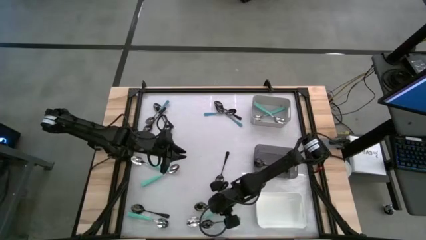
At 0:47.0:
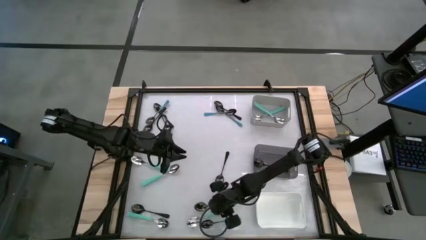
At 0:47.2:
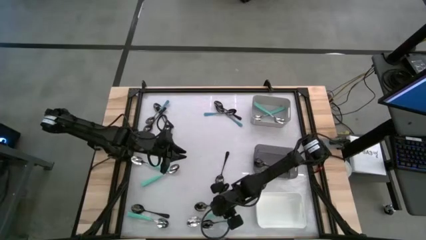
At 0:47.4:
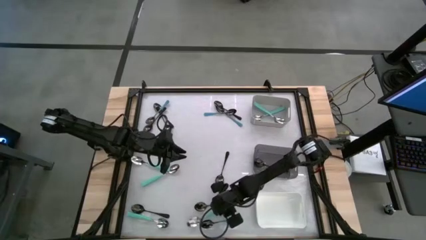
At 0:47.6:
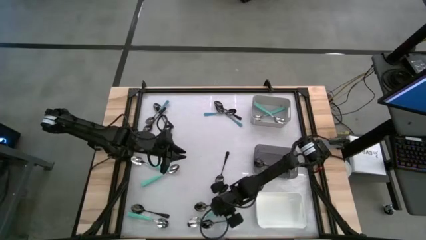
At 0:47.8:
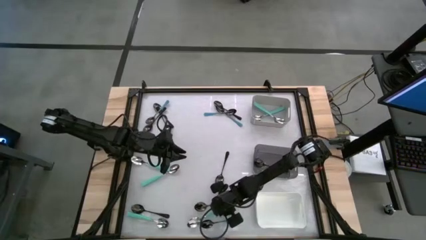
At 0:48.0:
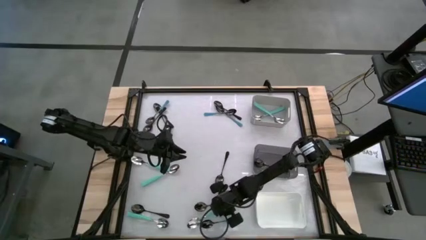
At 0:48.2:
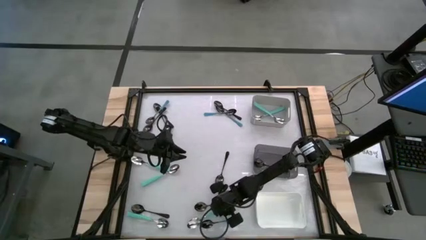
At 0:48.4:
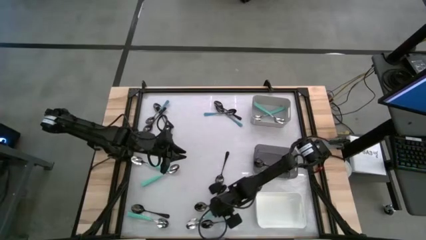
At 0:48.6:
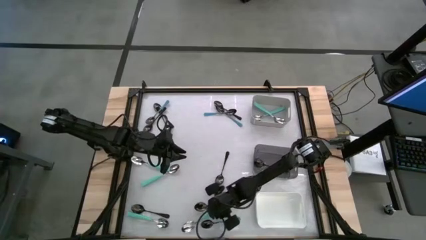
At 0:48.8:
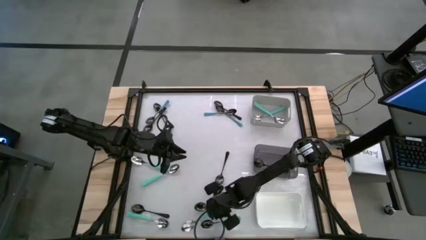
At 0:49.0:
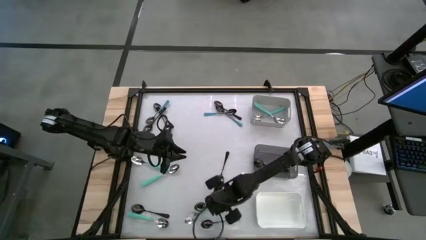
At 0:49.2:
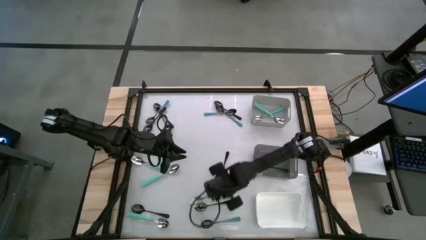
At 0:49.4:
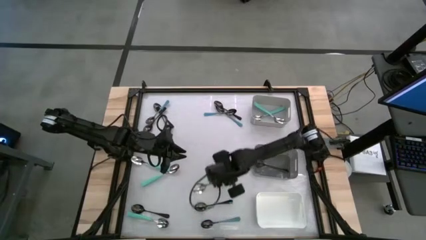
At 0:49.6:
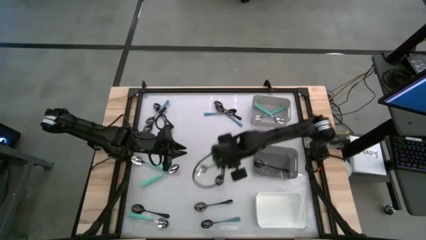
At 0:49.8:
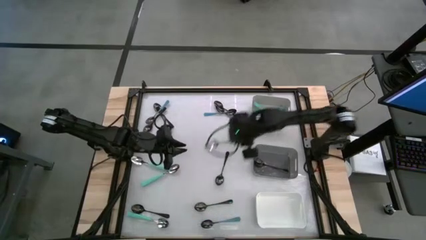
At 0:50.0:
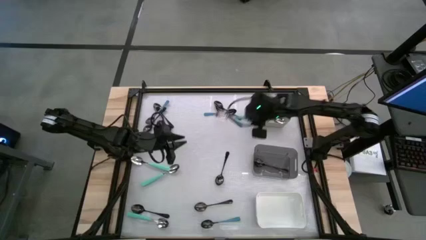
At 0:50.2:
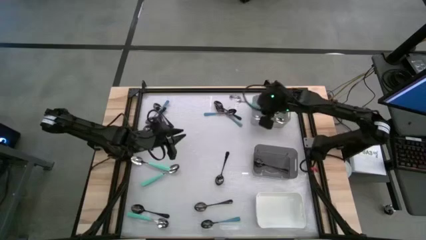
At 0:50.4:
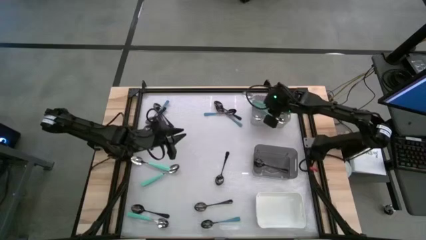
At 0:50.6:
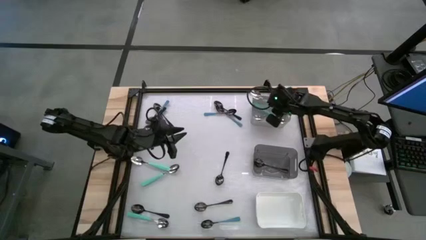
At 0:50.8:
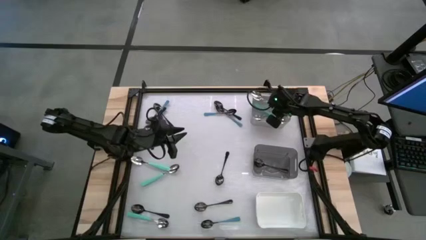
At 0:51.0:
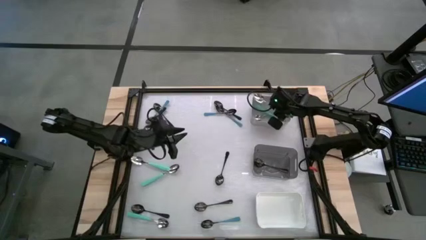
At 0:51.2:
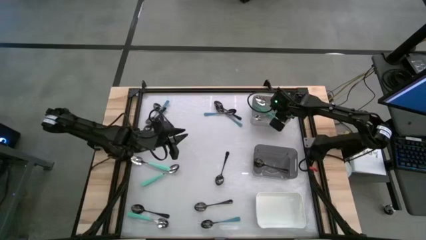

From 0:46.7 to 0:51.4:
Task: Sort silverware by color (type)
Put the light blue spoon into the gray bin

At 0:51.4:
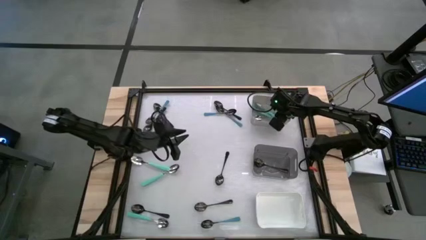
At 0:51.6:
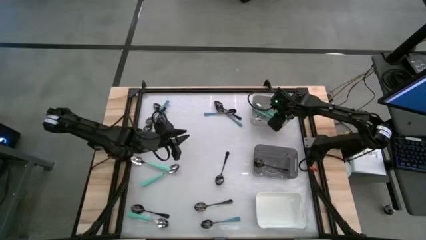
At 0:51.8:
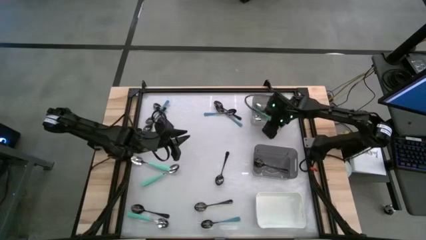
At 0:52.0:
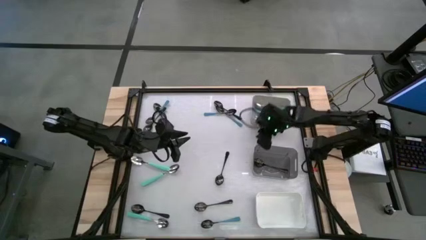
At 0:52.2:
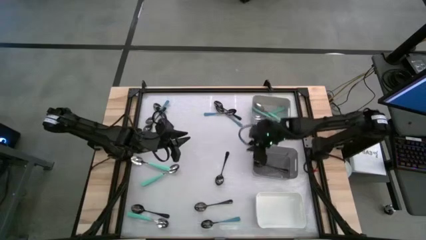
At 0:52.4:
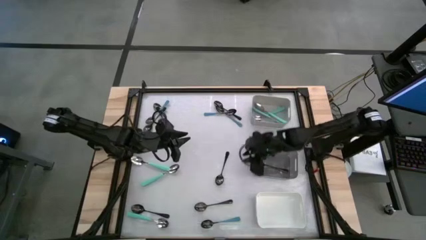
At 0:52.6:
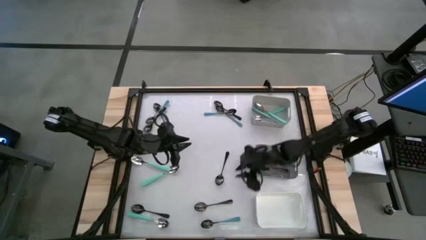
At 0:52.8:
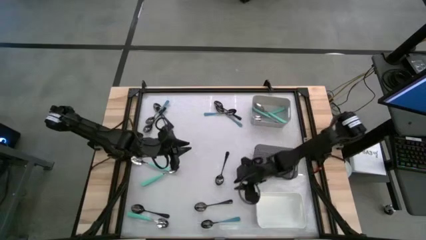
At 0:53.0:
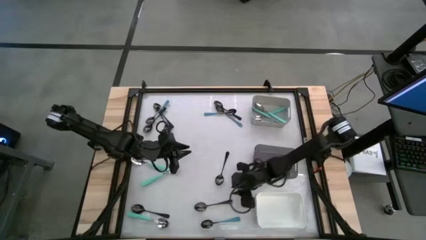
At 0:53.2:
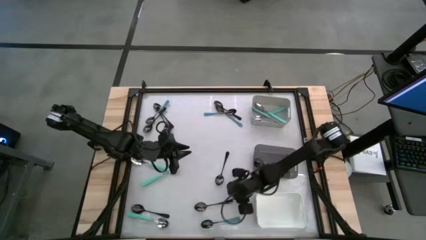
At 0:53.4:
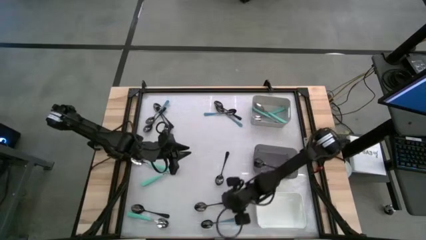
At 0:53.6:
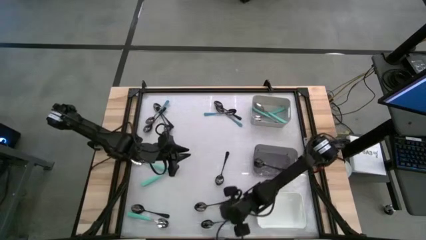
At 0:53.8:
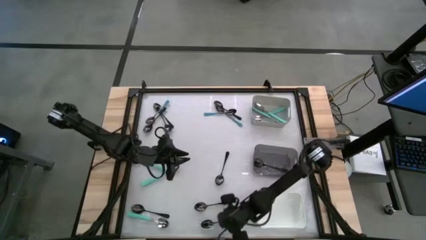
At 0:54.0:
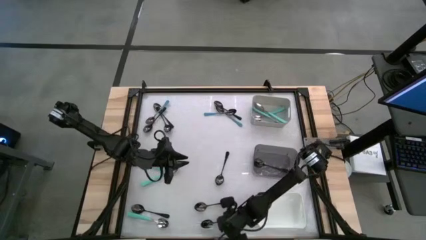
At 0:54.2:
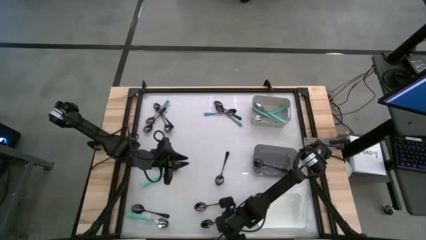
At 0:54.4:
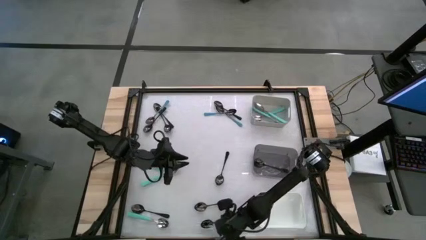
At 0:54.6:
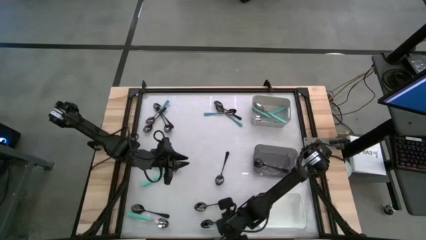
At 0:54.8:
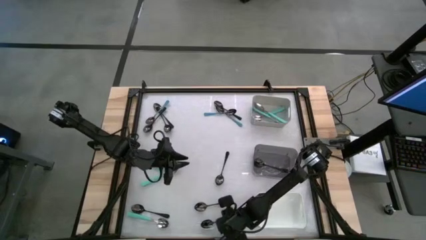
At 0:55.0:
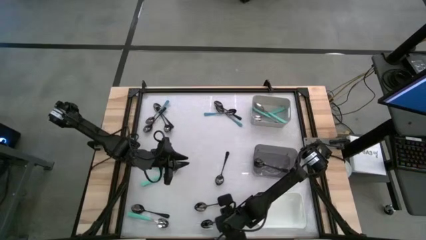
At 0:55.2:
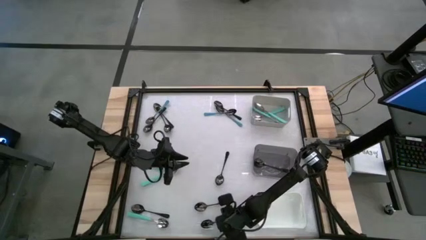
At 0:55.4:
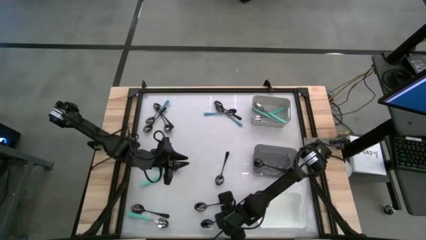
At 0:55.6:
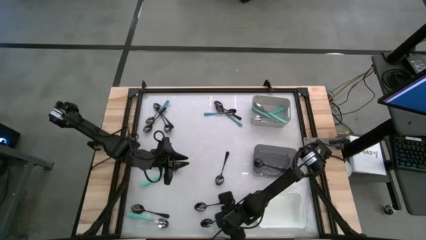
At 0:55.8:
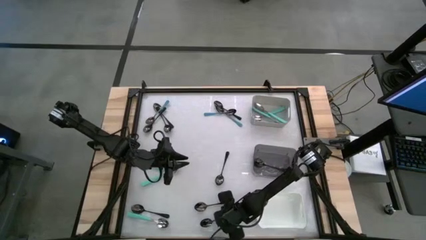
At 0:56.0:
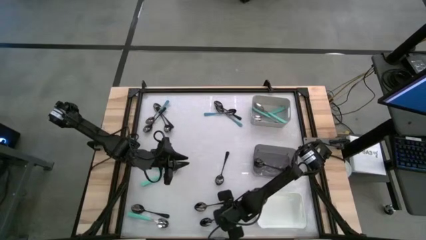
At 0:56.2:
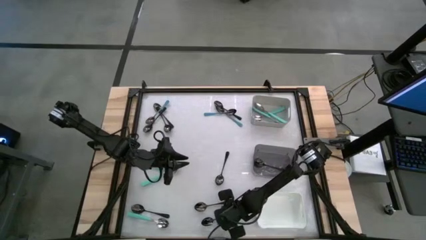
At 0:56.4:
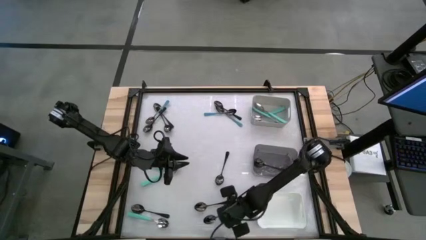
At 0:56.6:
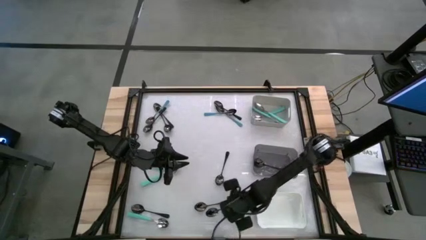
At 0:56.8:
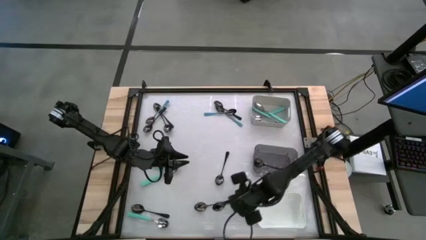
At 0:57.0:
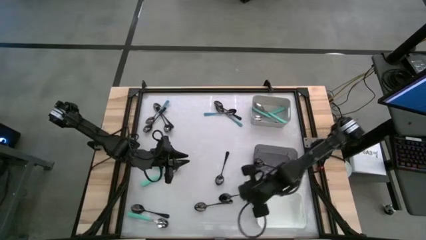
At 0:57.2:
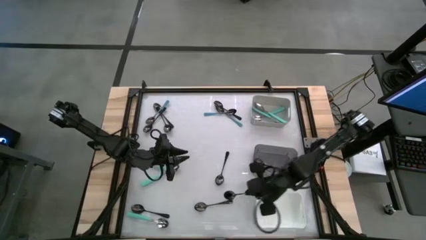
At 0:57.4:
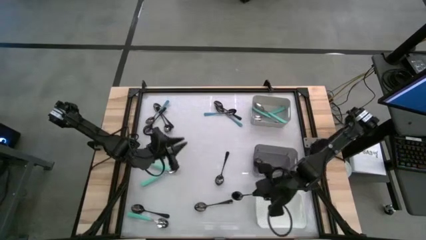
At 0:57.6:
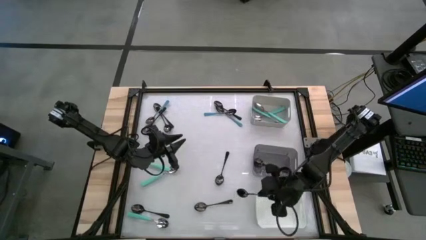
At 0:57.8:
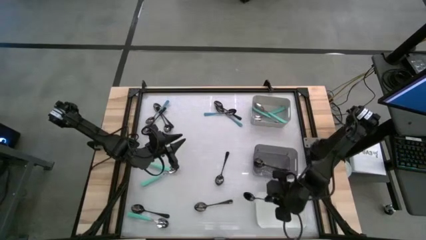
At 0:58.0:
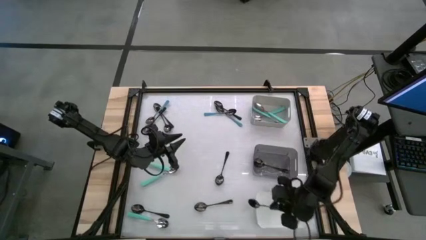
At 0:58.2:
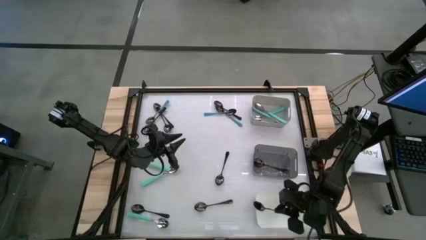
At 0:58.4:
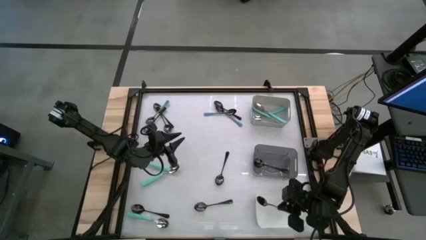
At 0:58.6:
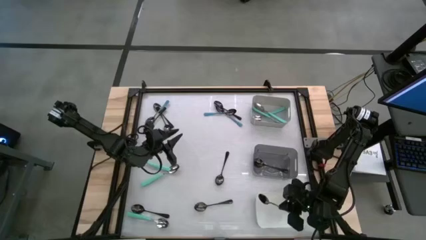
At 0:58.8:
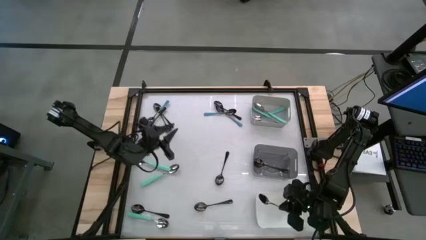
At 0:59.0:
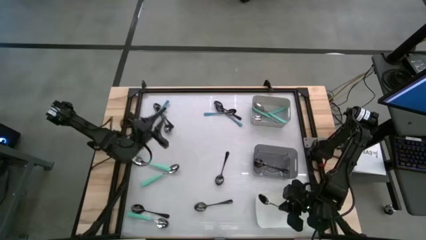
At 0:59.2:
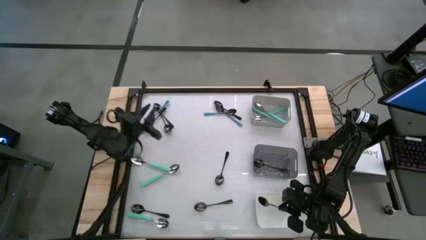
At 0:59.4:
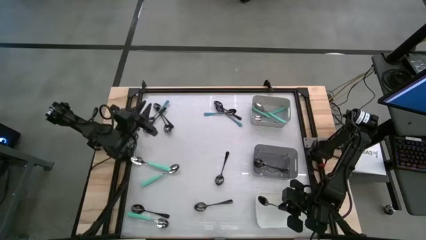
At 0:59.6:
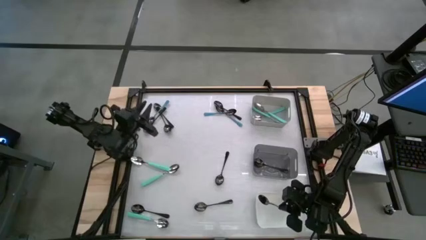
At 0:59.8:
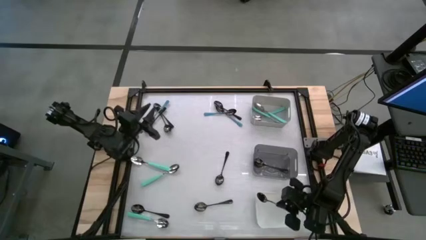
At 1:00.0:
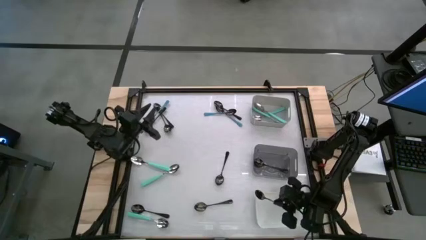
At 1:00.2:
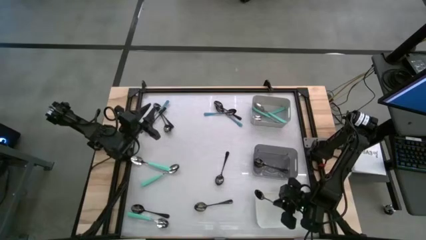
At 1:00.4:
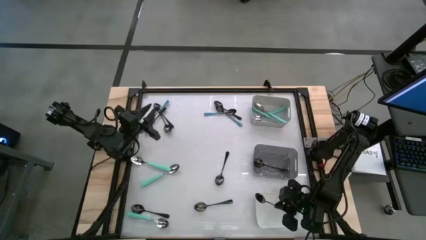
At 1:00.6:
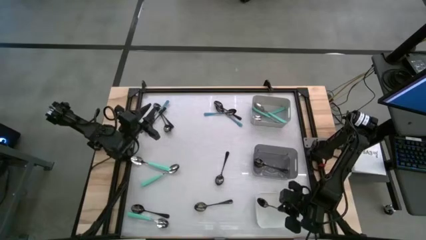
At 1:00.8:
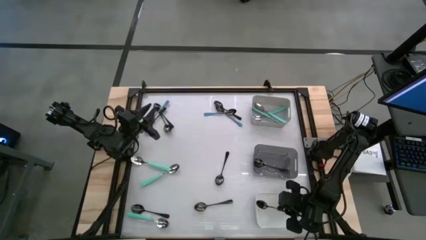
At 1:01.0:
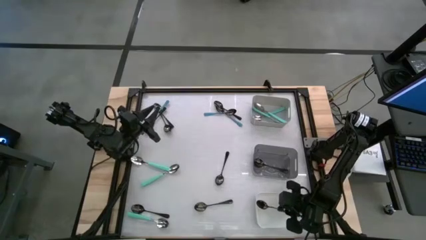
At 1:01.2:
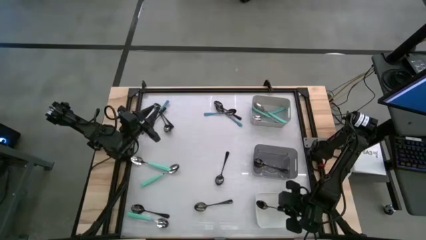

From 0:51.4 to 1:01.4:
Put the blue spoon into the white bin

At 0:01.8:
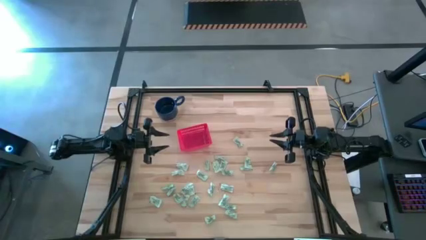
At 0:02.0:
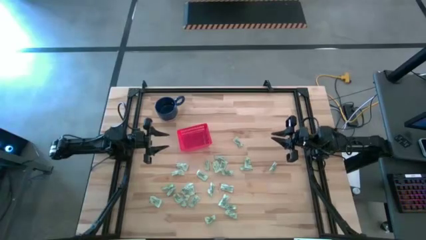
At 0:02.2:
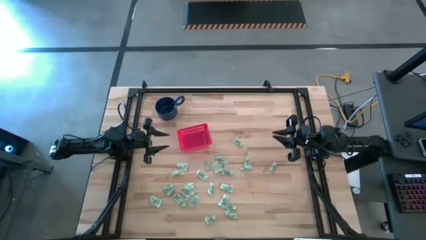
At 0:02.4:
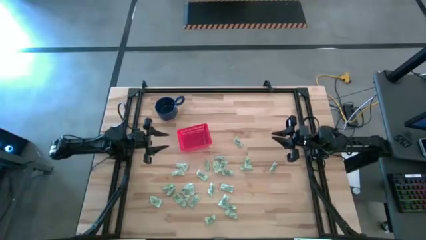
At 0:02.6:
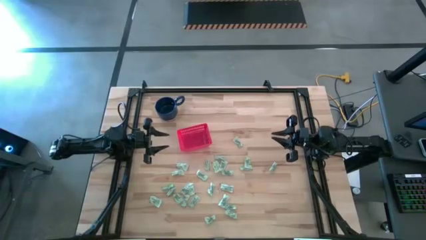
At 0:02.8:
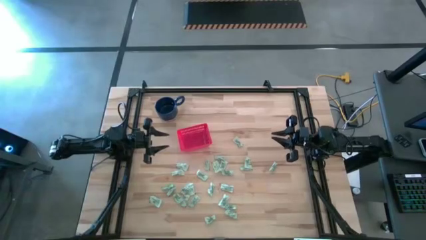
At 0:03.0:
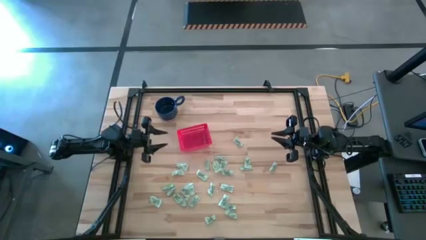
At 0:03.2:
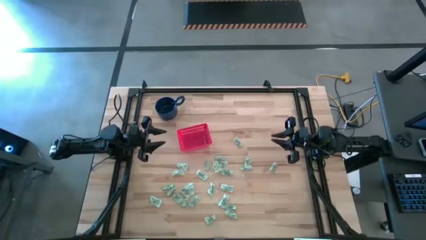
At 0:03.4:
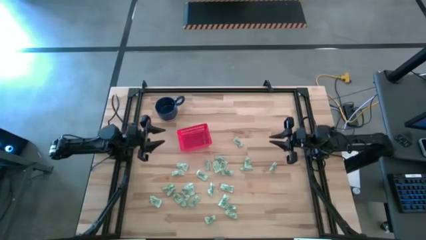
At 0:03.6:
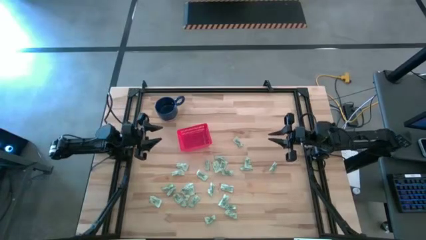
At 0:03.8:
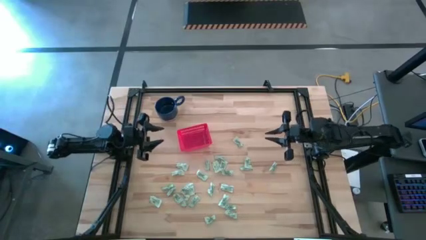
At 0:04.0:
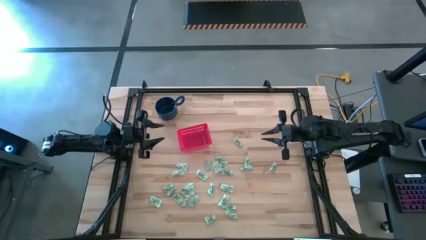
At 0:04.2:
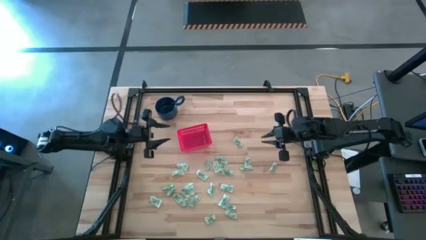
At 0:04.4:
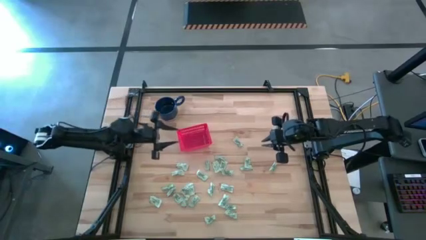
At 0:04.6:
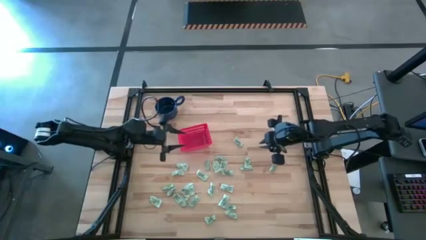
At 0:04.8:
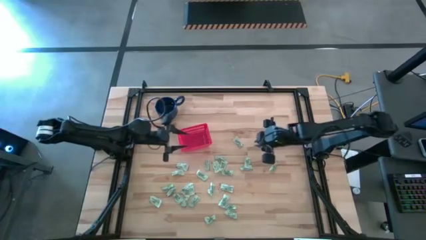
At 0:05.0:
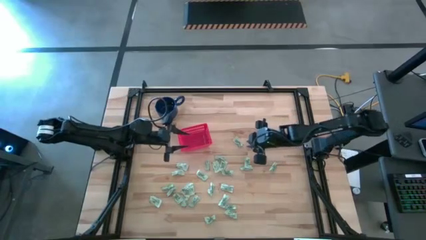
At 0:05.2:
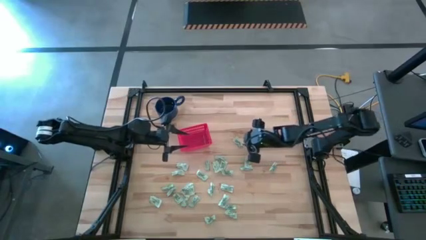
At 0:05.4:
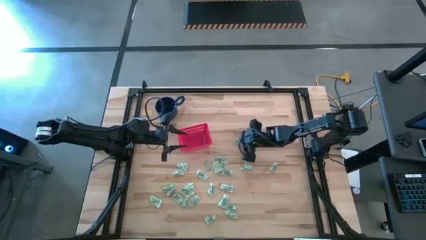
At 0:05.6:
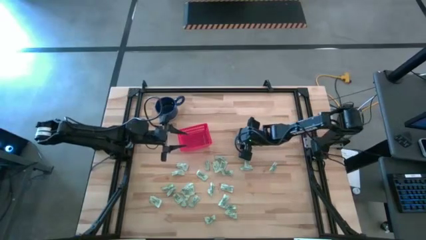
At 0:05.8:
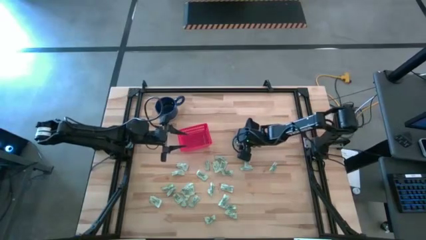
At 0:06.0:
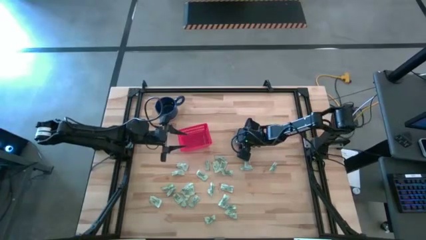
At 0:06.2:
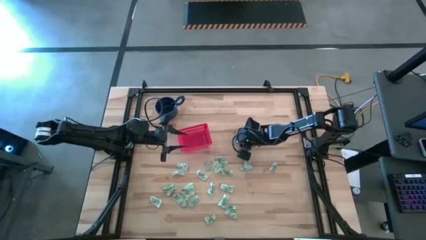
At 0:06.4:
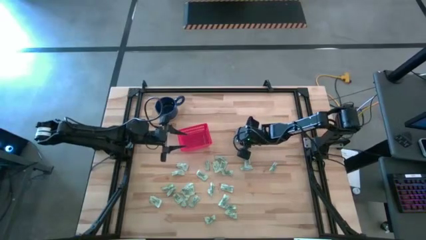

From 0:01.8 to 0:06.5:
Task: Pick and place items into bin
Put the green stevia packet into the red bin
